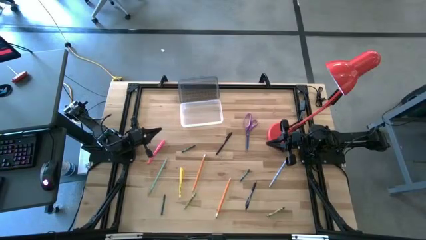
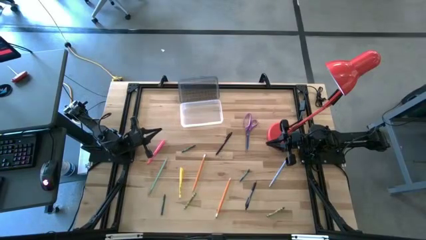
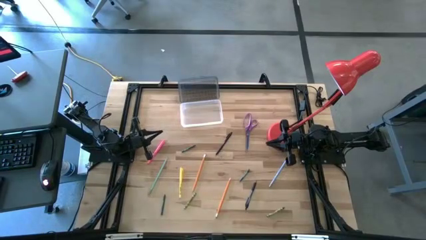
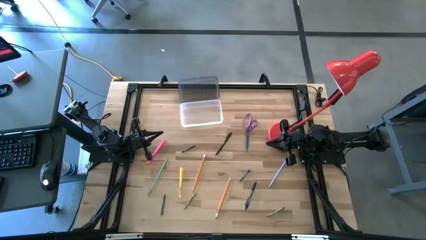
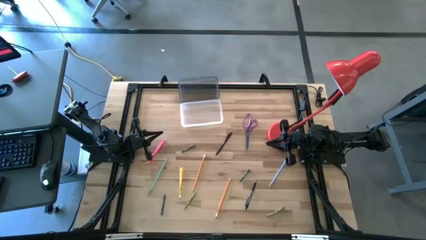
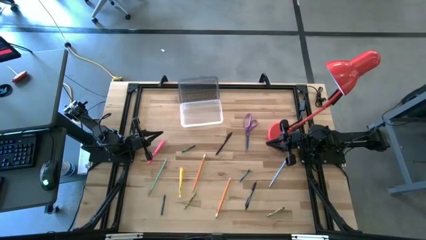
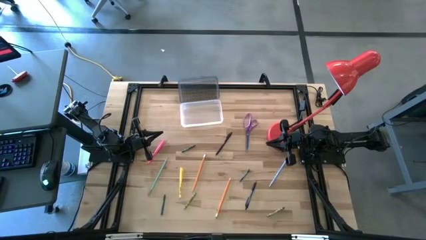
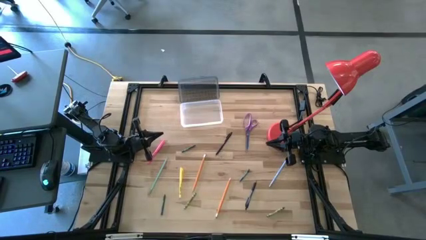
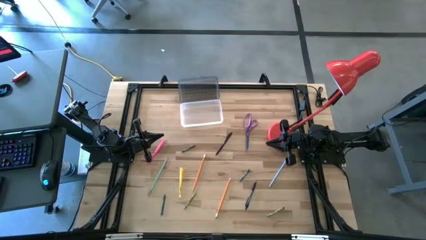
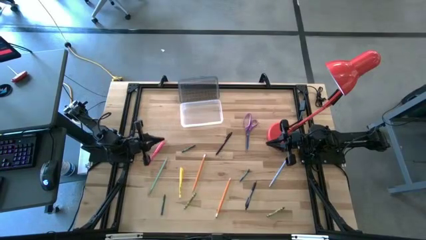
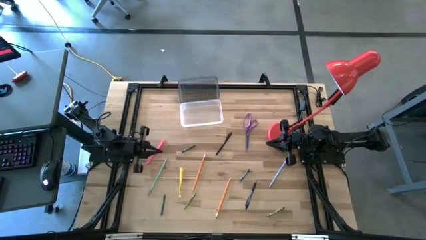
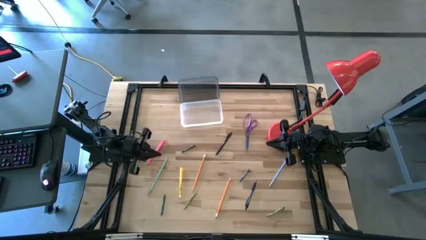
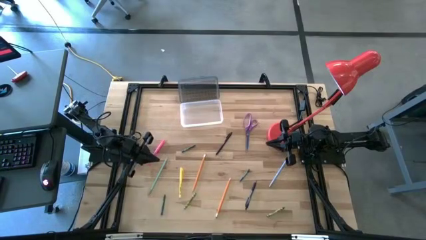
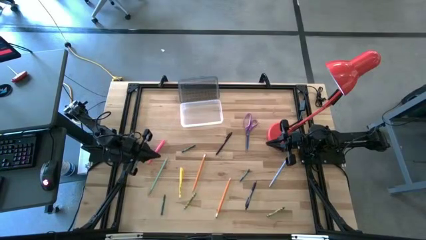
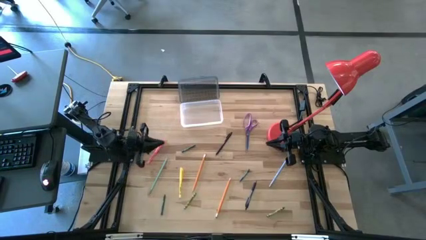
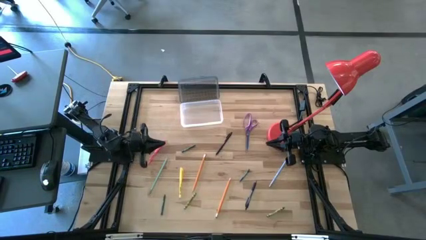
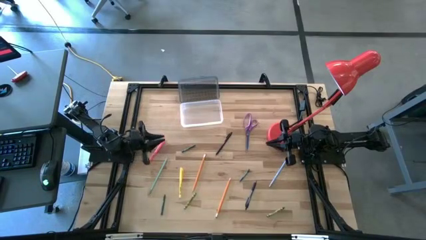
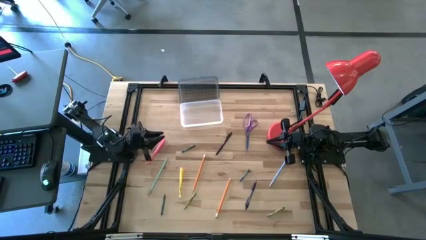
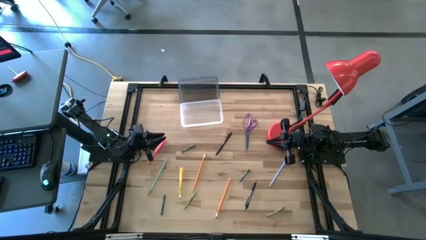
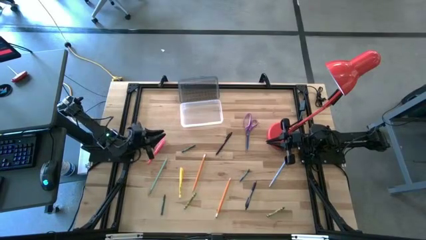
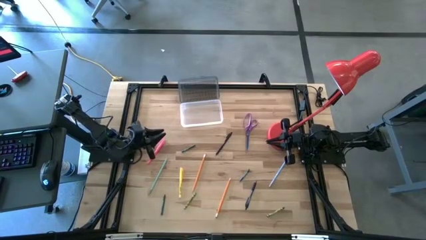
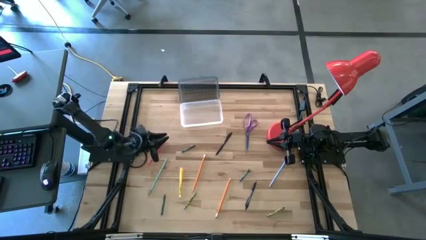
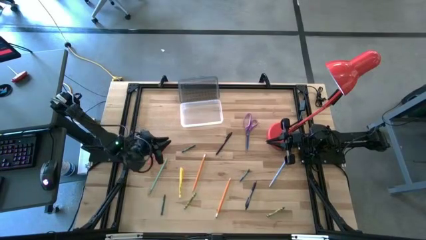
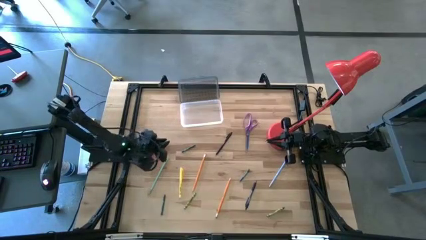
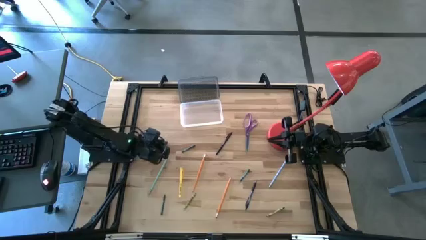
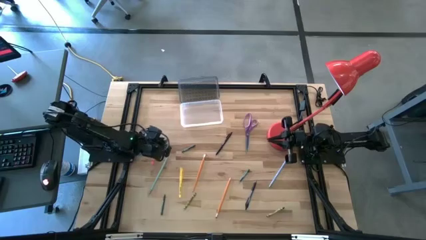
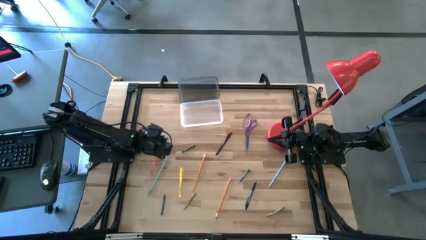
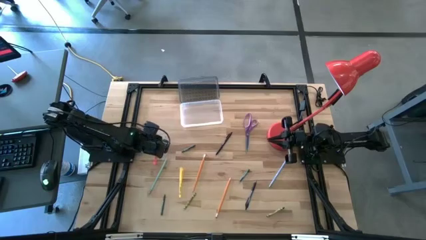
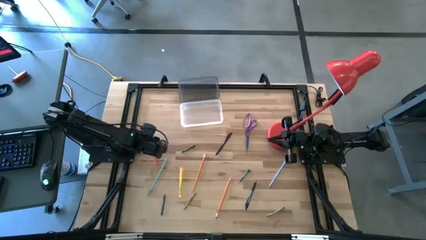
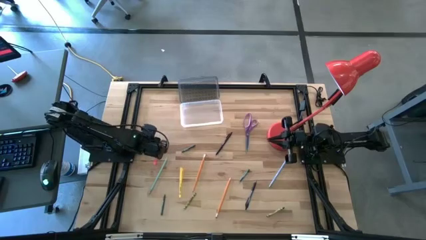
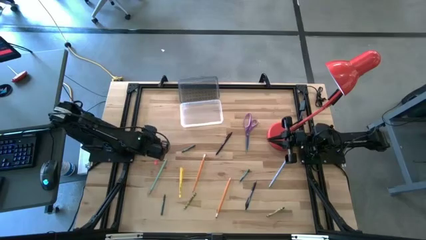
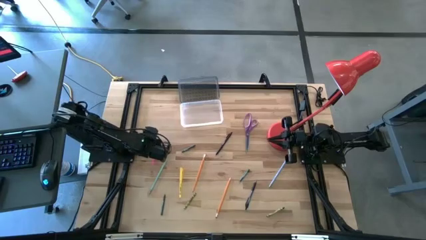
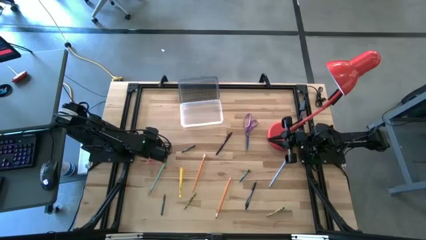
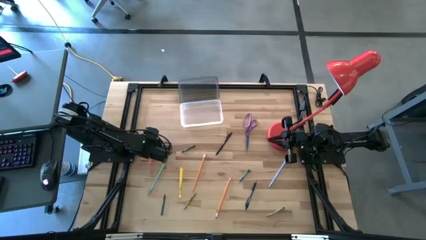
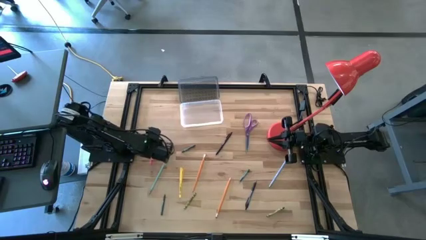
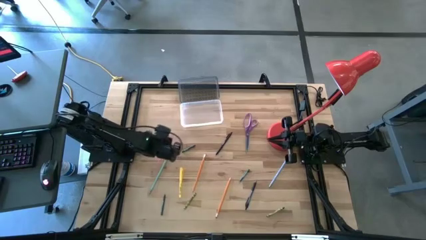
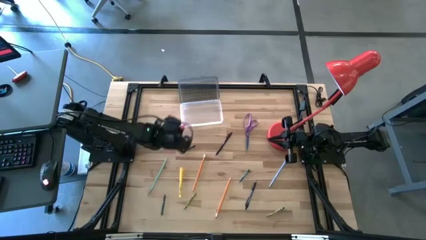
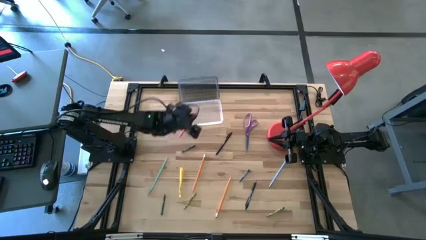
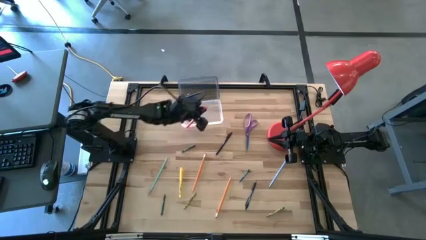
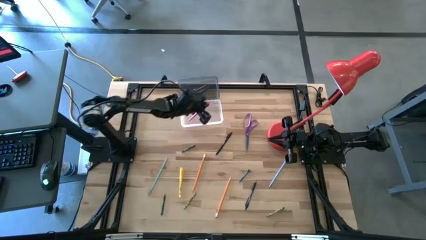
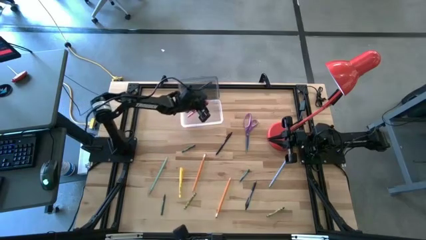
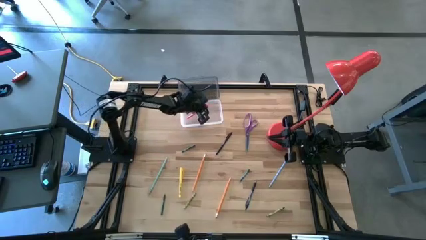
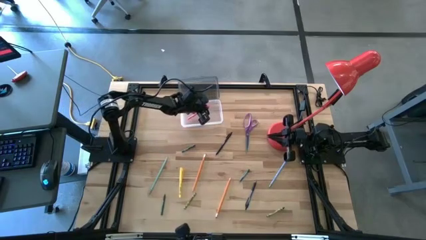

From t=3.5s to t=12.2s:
Task: Pick & place school supplies into a supply box
Put the pink pen into the supplies box

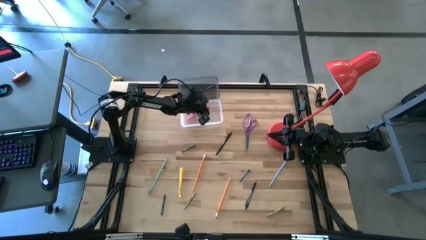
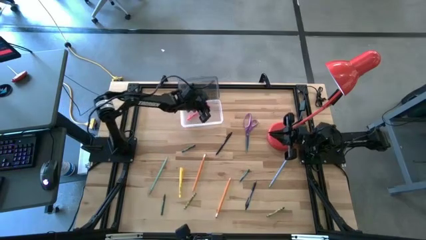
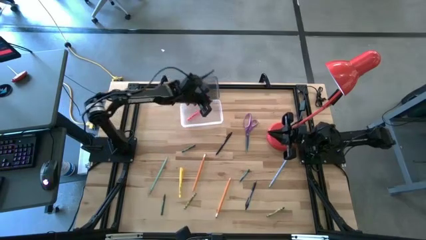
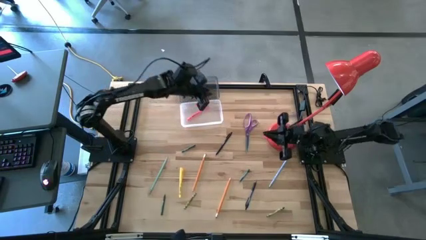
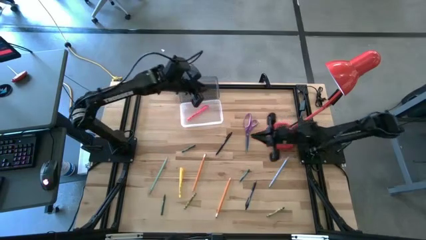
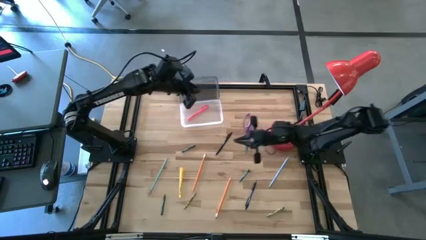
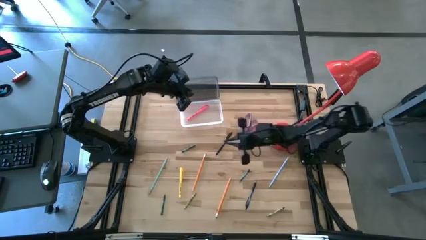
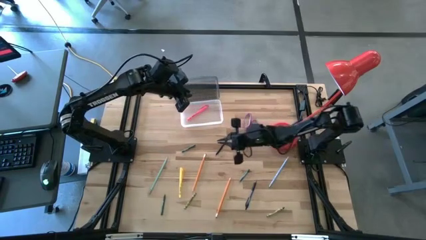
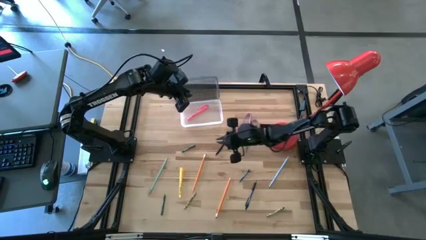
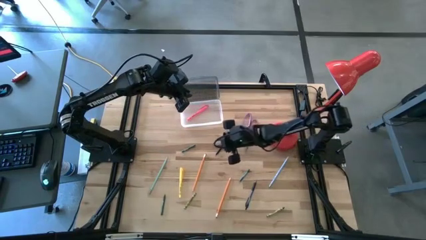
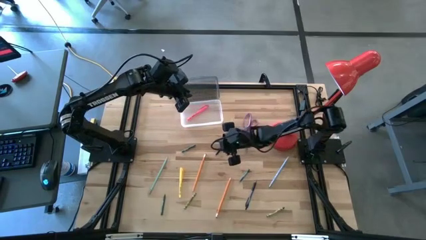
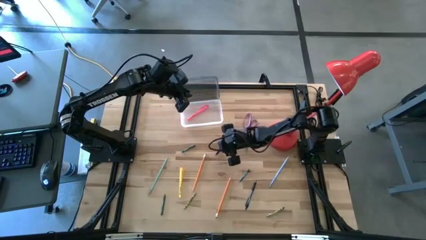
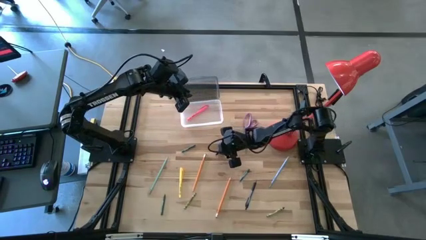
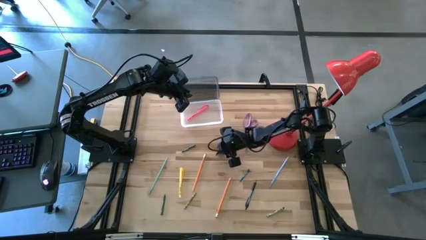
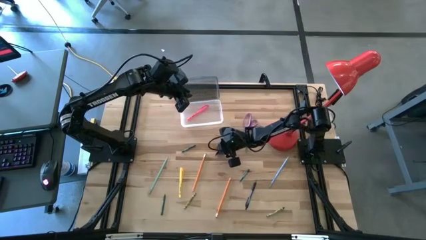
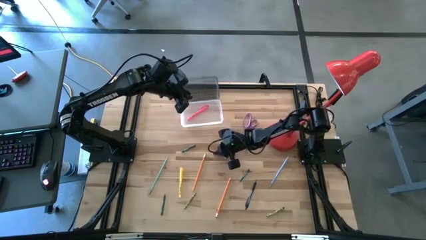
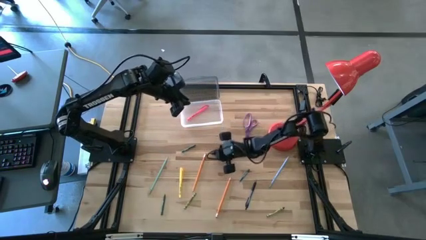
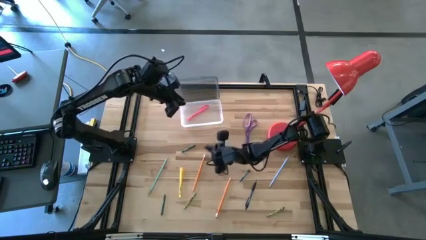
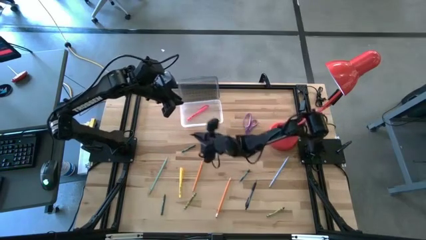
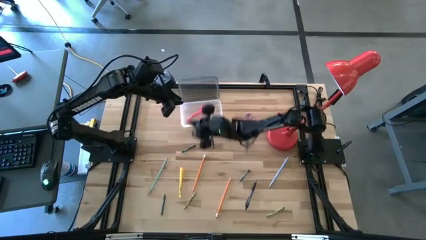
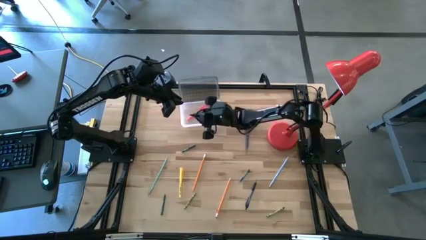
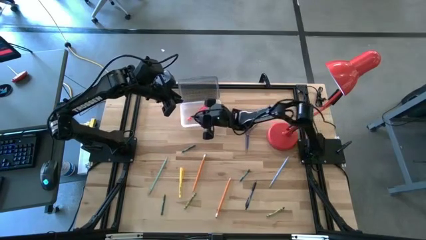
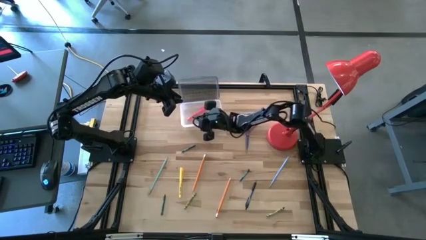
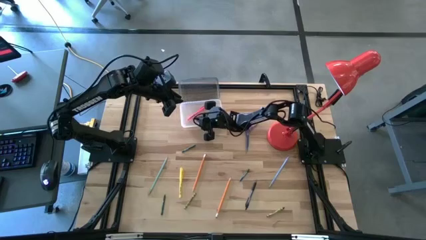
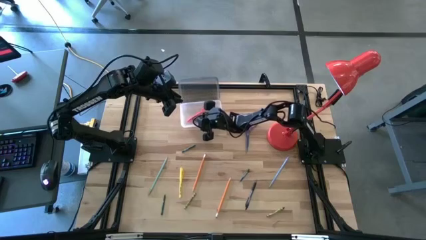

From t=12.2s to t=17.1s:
Put the black pen into the supplies box

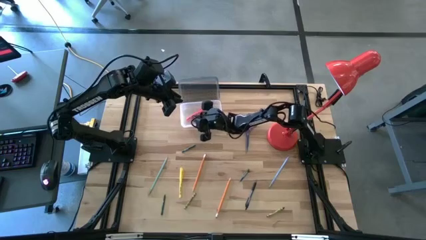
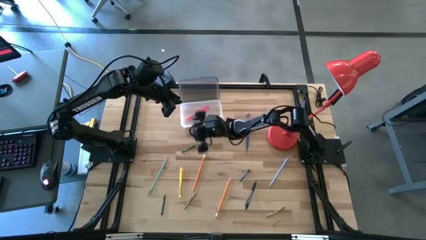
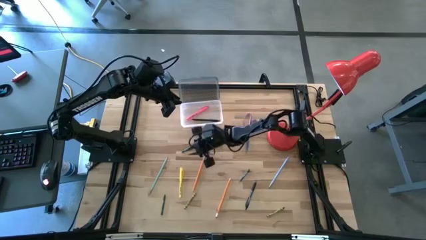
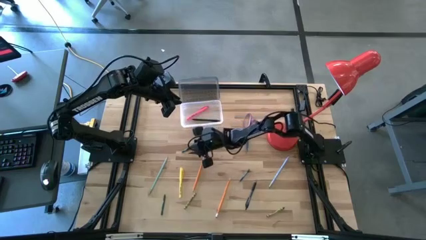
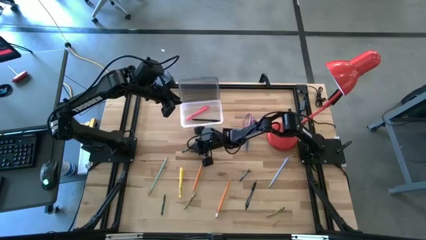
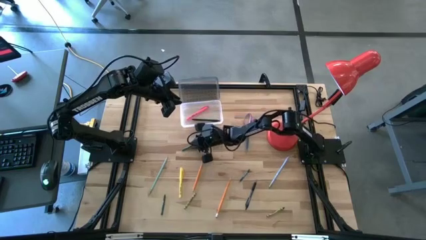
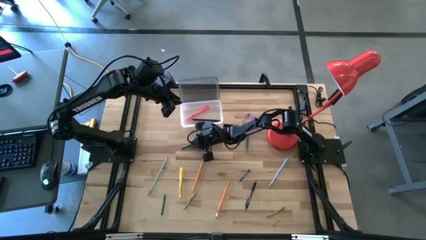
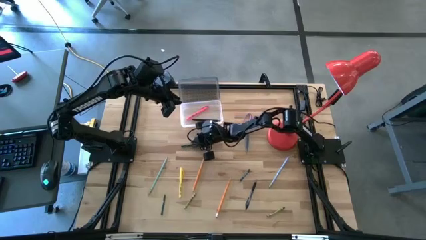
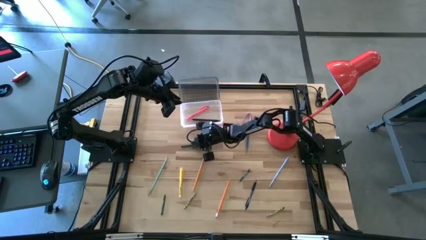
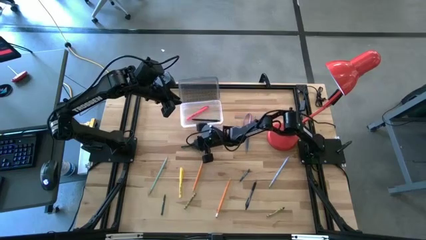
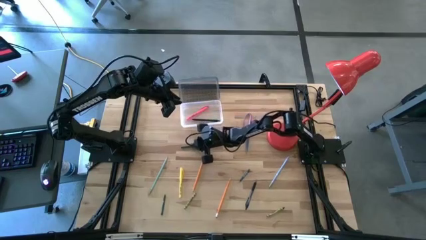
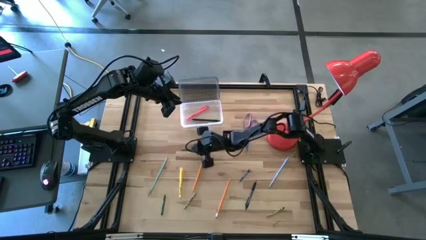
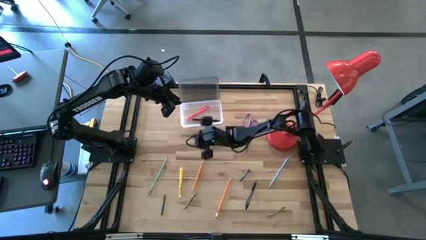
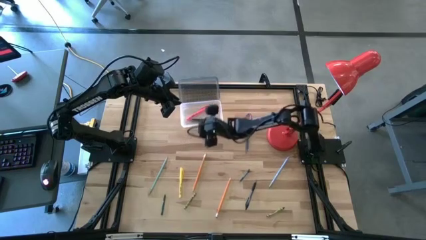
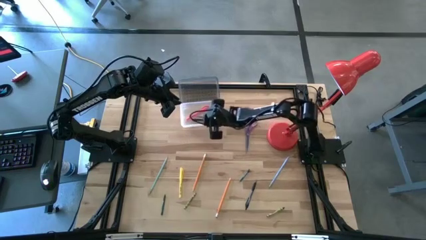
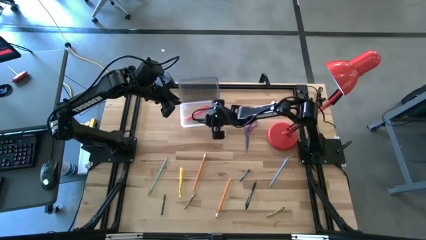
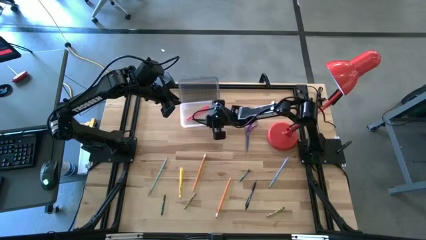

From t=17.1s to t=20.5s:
Put the dark green crayon into the supplies box
